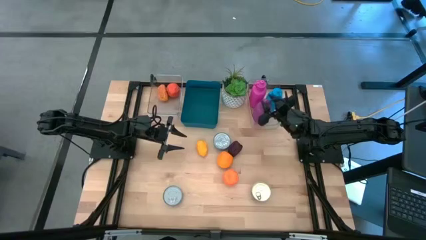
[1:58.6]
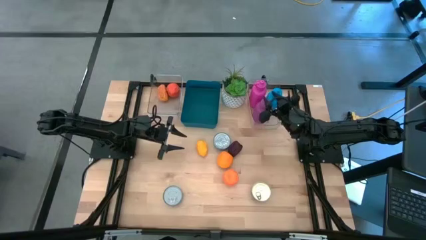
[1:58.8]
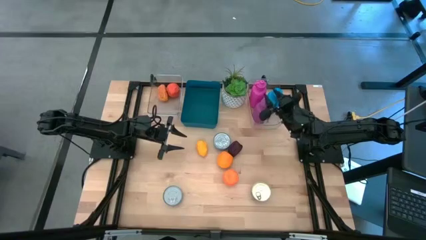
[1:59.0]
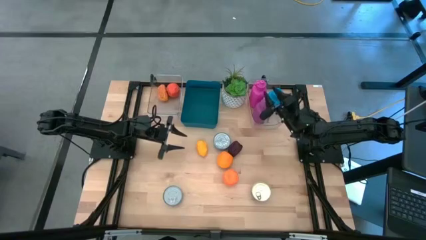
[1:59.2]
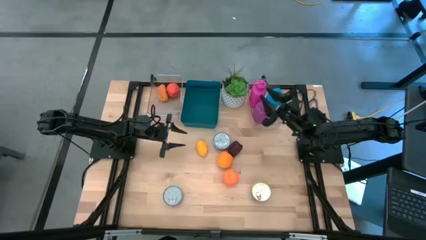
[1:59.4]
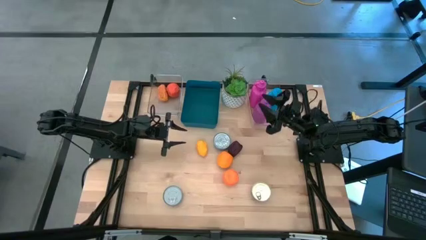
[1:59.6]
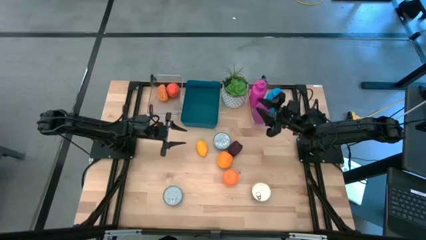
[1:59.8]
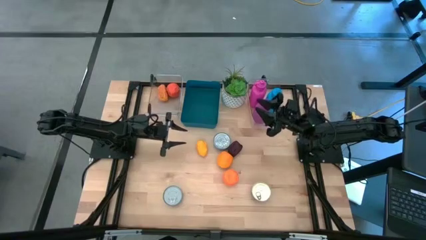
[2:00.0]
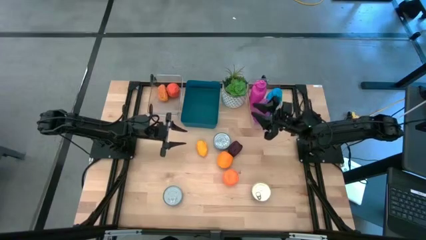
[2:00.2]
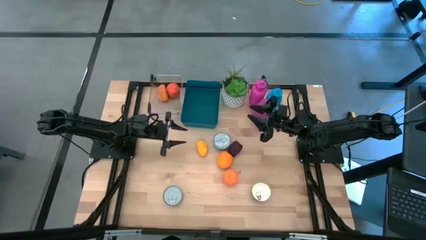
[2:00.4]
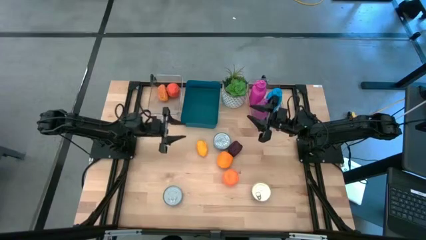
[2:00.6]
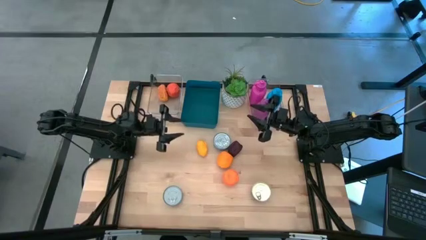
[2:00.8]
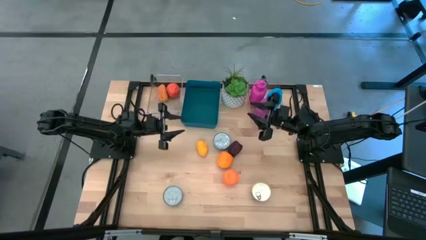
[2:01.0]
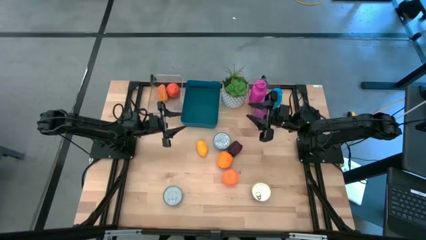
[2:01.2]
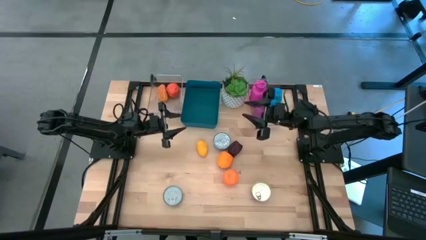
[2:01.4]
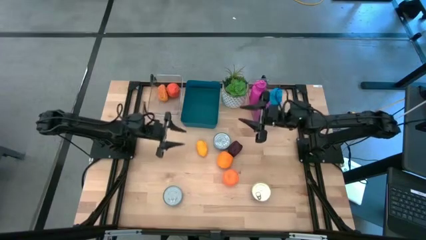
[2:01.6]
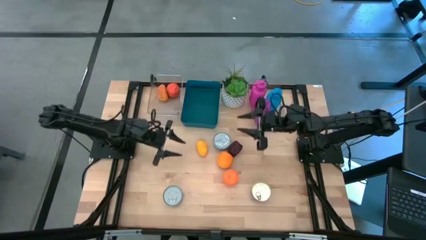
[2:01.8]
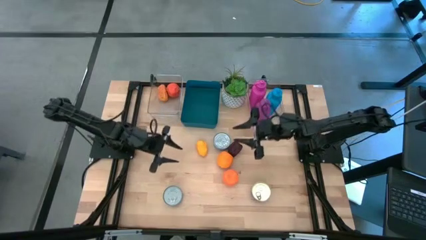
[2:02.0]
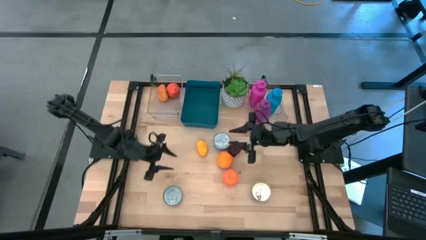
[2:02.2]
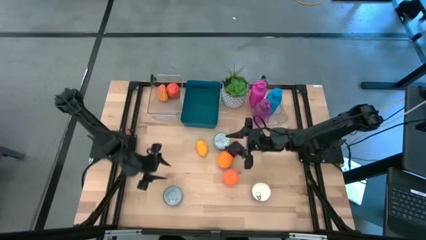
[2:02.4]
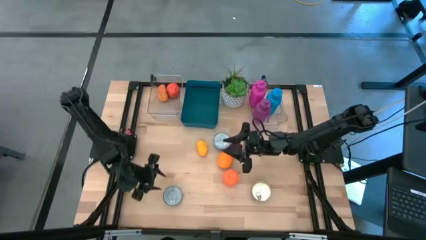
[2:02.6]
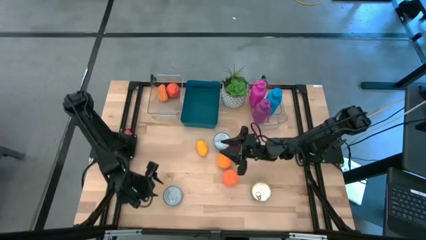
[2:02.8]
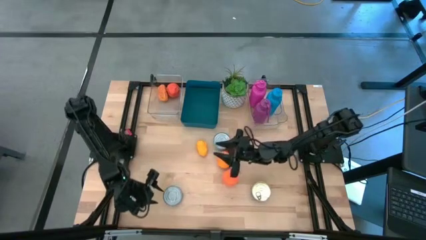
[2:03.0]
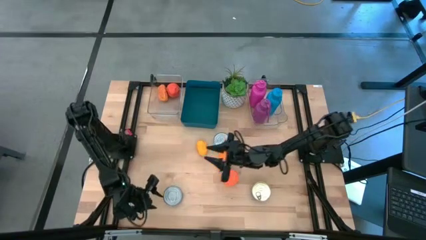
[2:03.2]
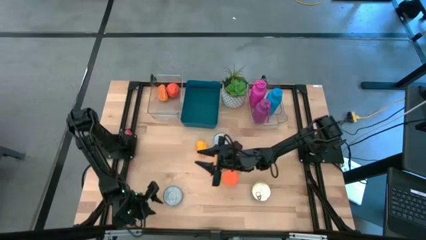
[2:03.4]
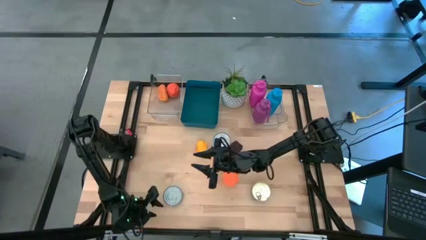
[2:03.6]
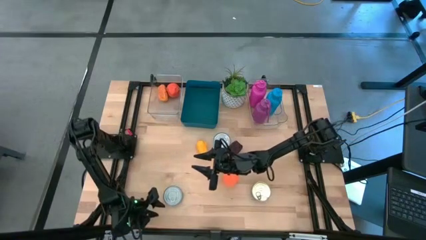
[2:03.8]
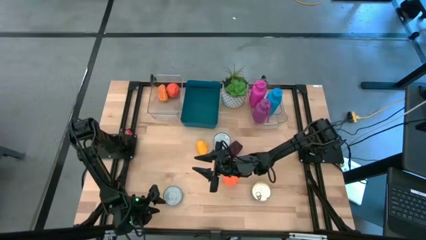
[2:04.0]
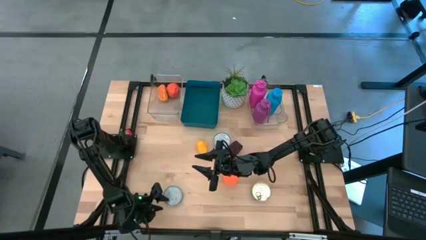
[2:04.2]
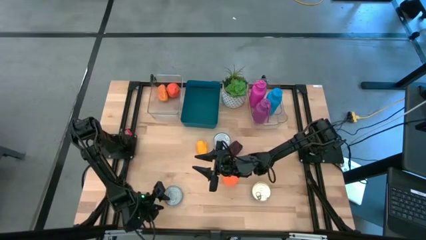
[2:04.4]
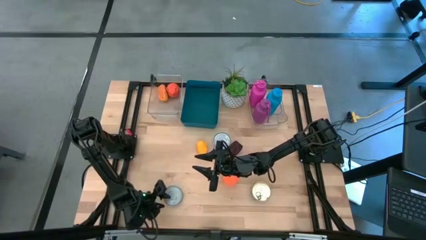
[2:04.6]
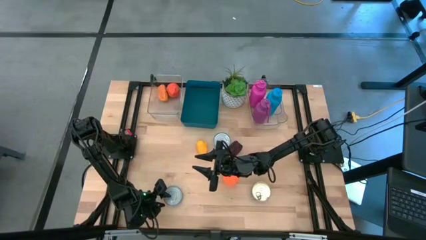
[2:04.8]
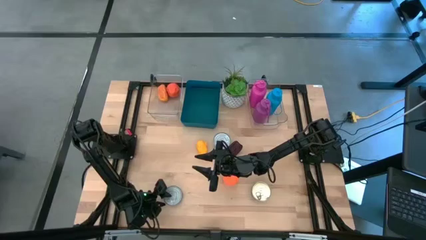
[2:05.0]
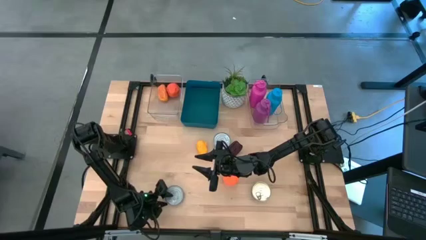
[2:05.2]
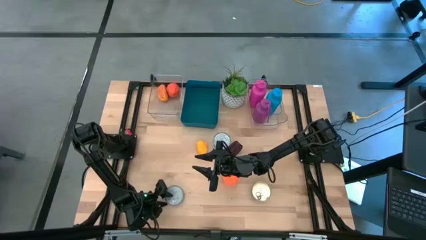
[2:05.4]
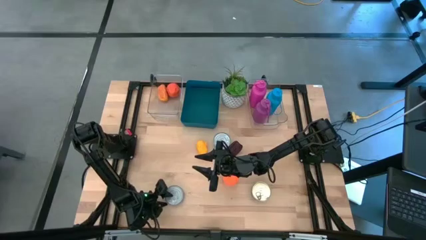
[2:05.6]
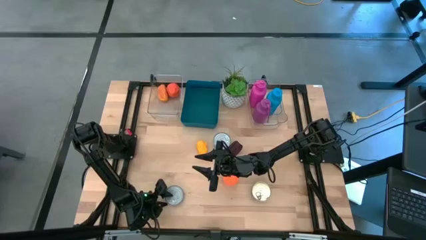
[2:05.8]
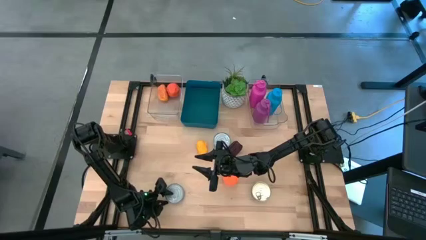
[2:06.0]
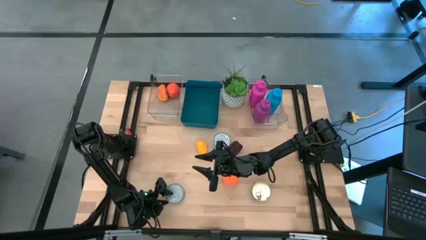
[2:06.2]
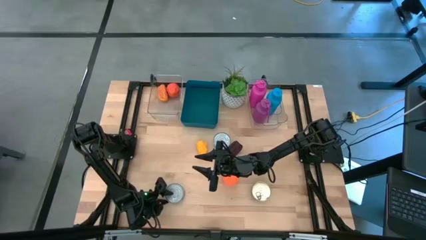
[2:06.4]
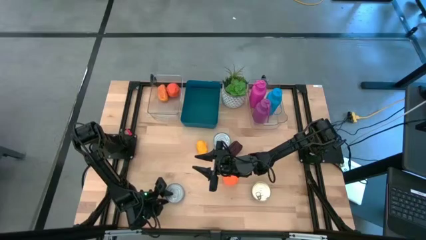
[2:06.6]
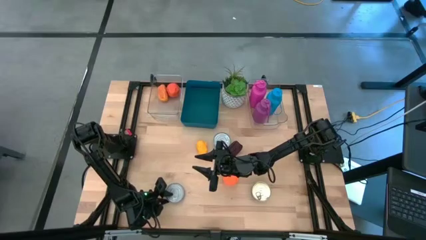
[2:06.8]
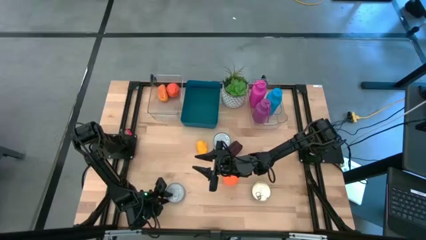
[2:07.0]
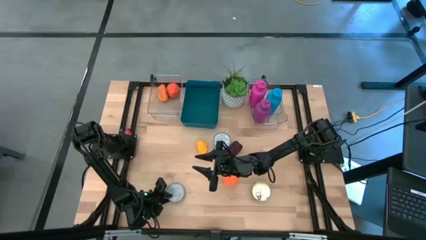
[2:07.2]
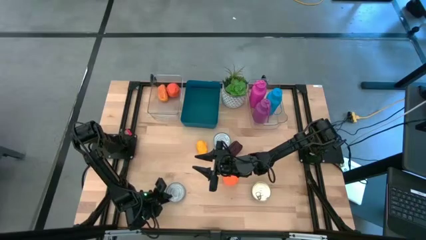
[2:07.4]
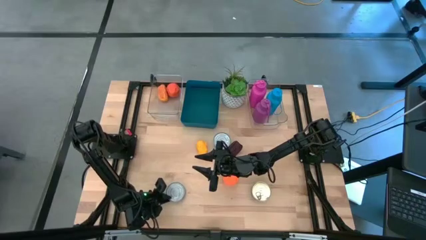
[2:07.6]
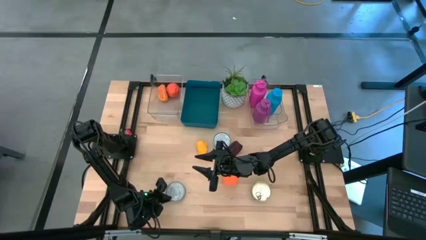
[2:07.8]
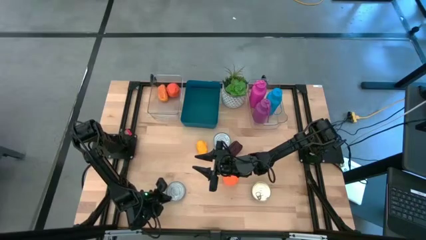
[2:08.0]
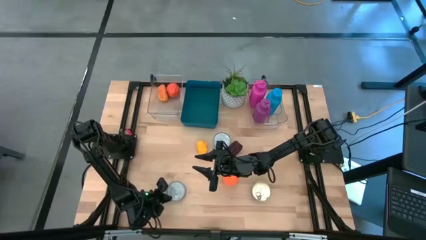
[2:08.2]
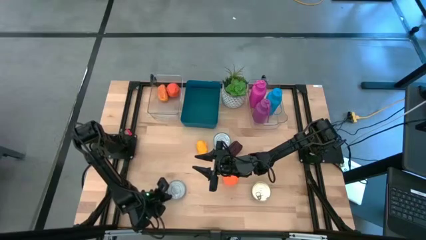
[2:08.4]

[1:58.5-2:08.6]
Task: Pick & Place Food Item
Put the blue tuna can into the blue bin

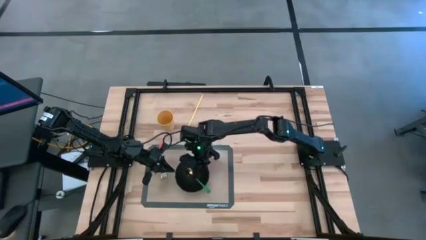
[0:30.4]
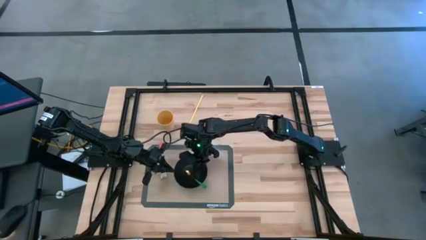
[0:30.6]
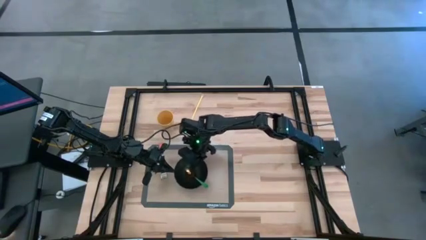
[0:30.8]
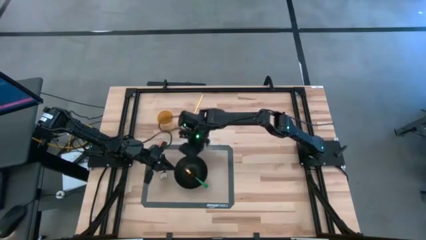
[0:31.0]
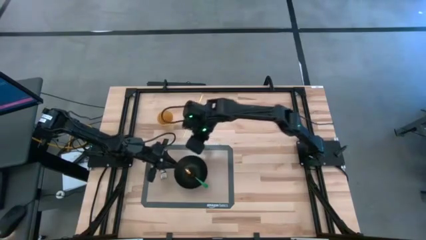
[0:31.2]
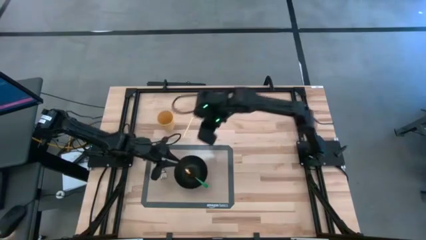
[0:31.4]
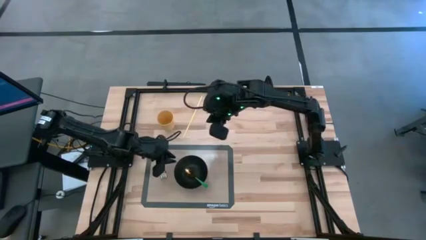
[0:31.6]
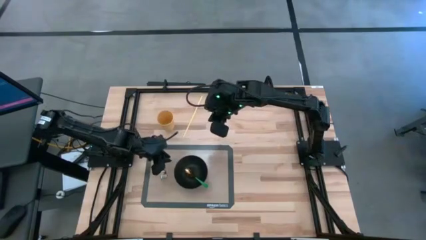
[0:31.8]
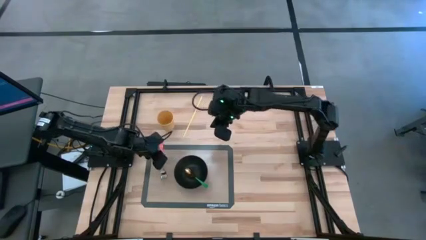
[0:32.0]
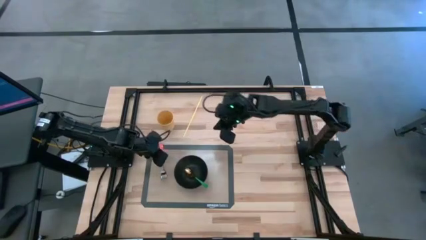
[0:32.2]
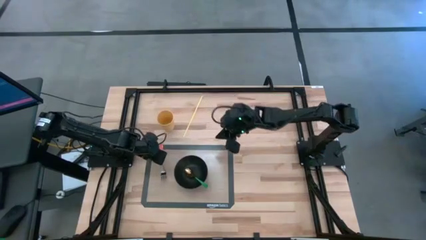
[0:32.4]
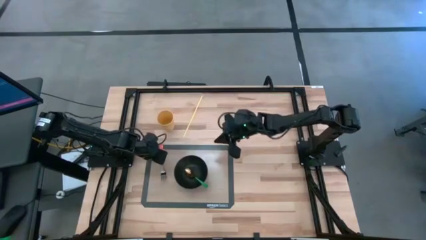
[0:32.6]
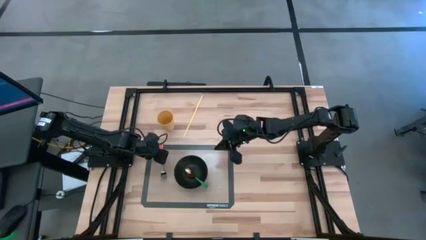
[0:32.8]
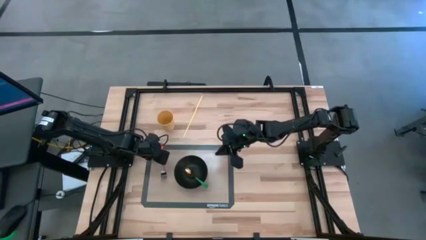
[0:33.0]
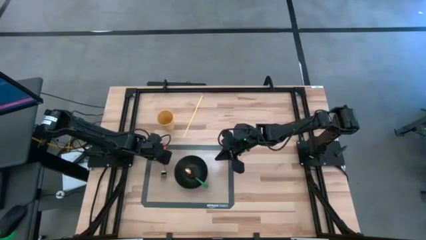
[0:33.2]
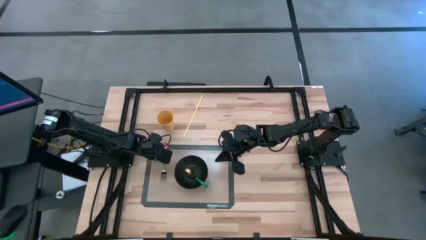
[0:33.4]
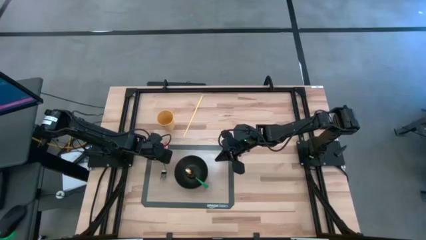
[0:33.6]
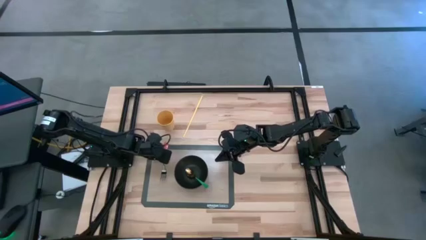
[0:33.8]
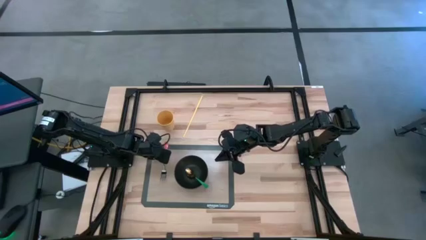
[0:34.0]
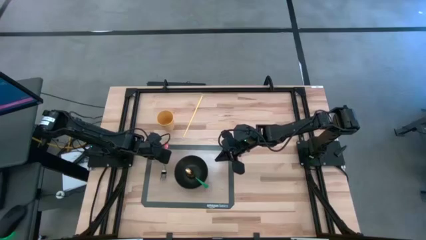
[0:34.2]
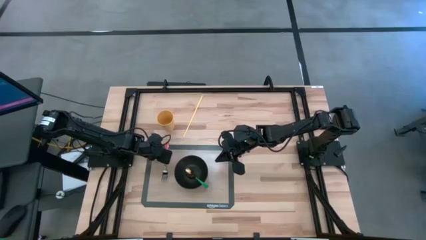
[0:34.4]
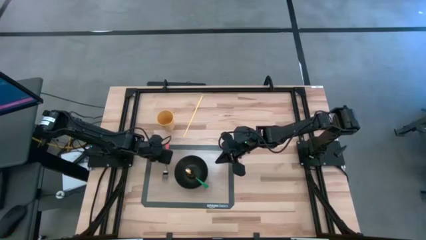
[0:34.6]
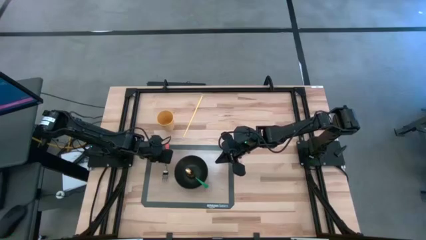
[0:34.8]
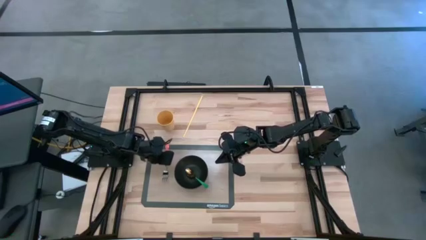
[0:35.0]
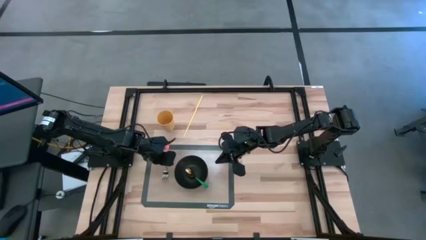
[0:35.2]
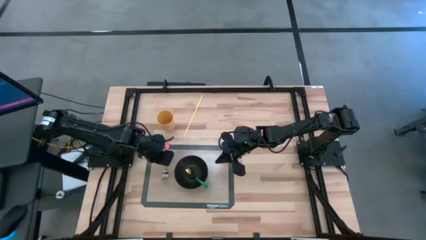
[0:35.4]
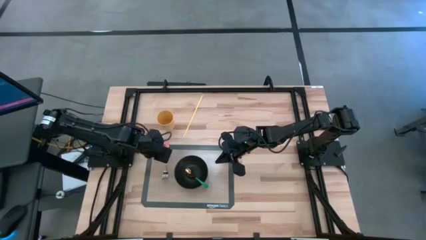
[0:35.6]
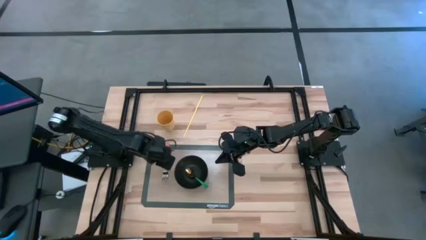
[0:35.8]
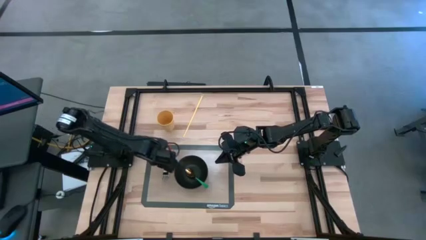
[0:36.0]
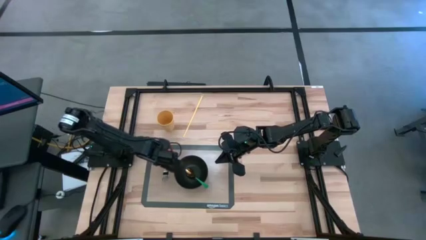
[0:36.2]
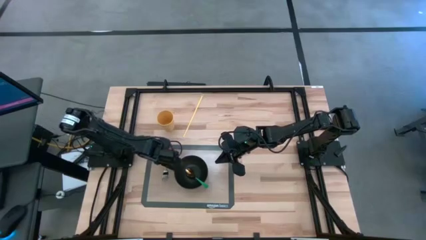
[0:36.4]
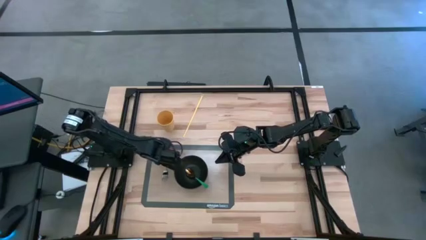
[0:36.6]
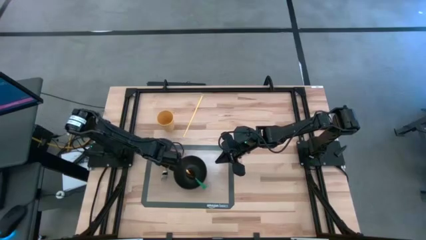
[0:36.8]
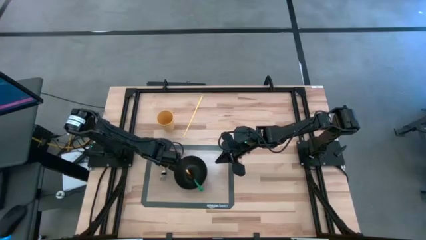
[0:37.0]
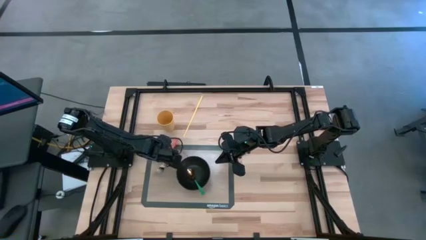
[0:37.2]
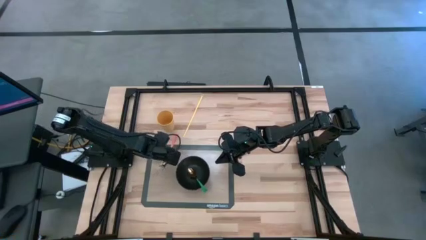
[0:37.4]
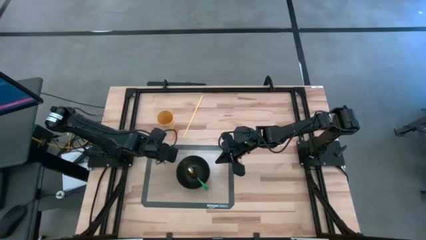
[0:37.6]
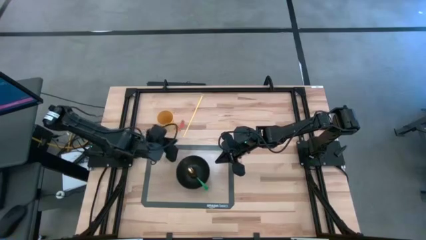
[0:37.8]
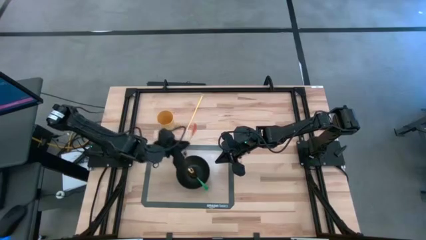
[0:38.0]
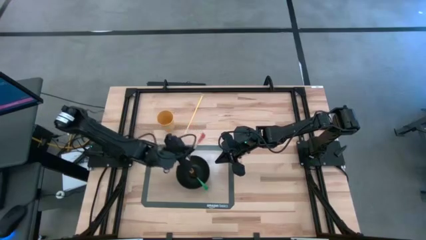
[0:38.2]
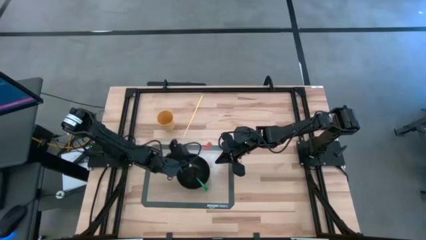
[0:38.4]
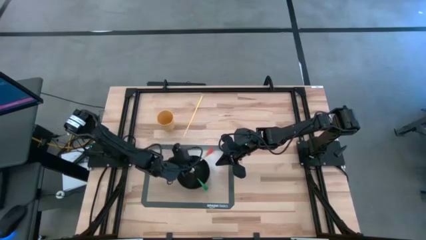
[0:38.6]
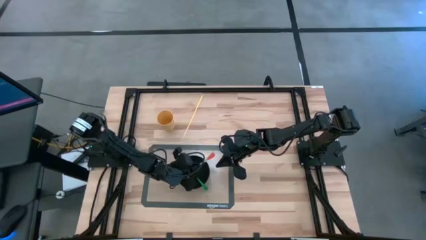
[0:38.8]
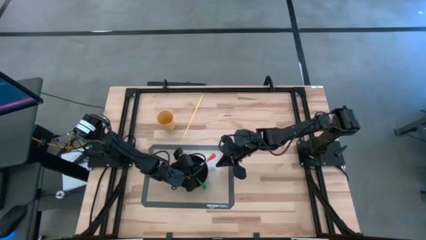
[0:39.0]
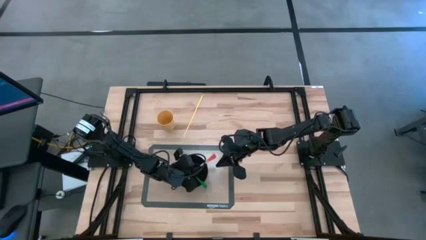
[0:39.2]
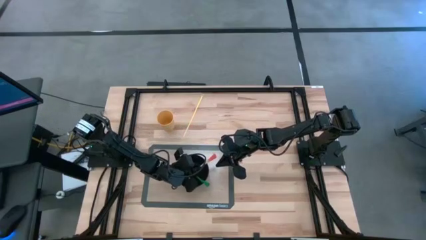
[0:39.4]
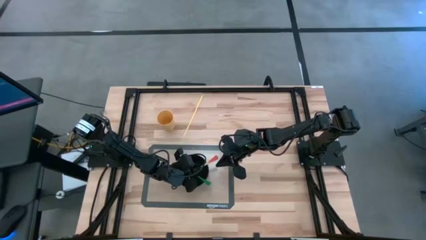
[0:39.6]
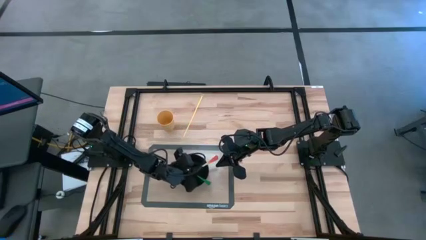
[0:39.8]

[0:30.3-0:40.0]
Task: Pick & Place Utensil
Put the orange fork into the black bowl
